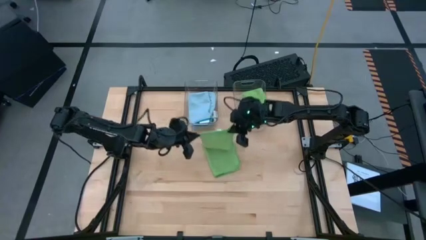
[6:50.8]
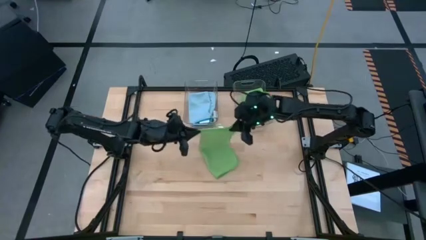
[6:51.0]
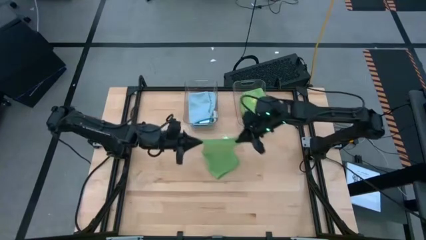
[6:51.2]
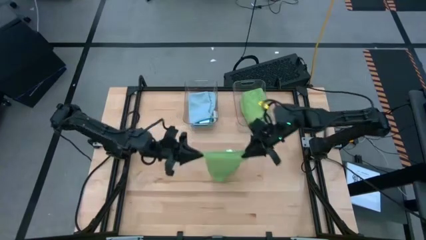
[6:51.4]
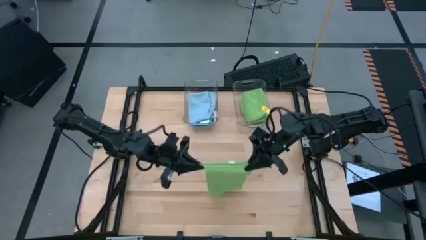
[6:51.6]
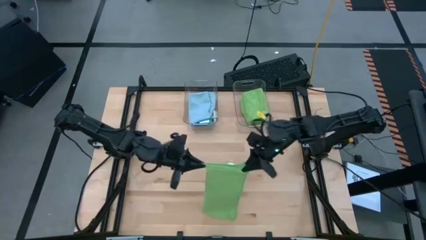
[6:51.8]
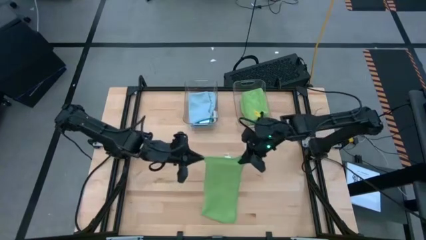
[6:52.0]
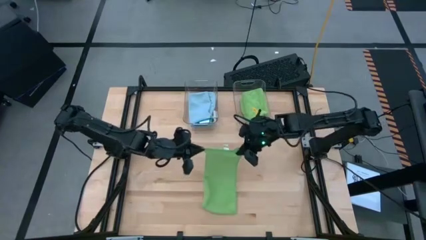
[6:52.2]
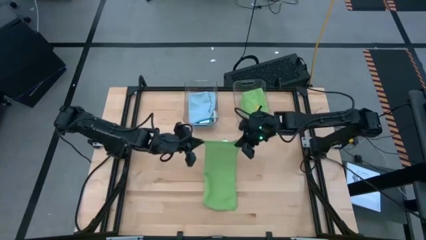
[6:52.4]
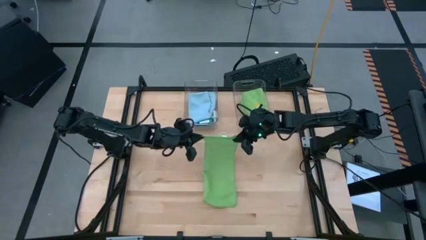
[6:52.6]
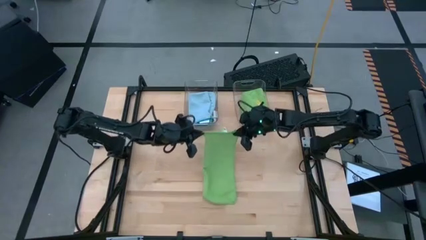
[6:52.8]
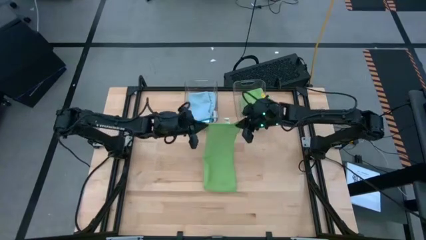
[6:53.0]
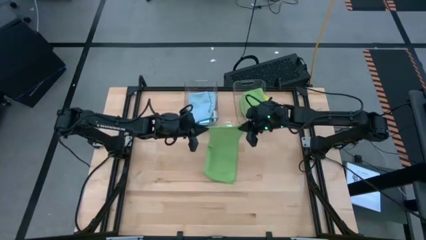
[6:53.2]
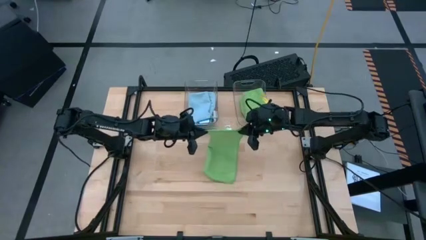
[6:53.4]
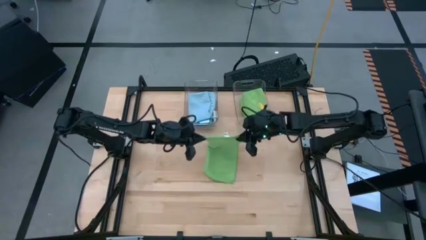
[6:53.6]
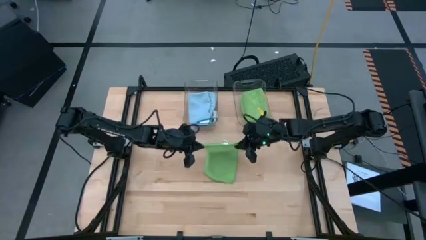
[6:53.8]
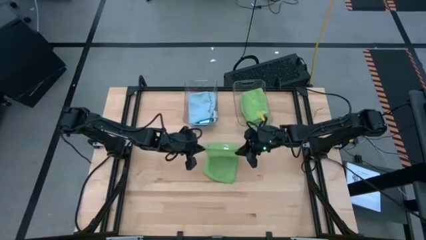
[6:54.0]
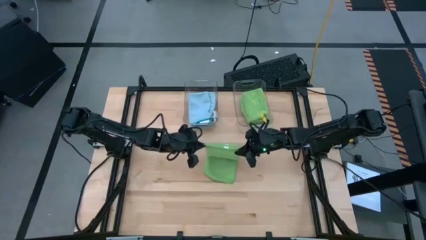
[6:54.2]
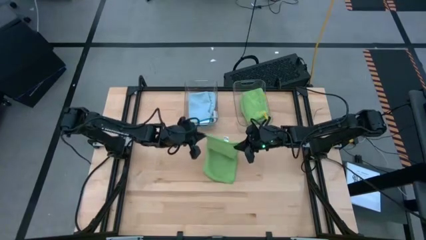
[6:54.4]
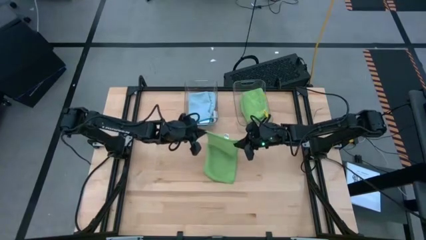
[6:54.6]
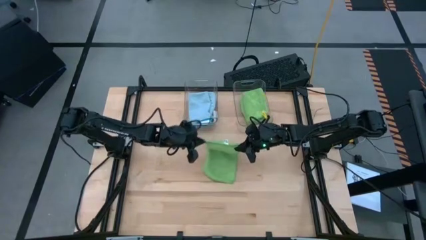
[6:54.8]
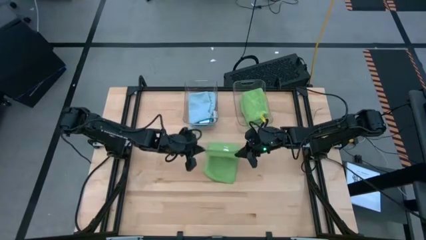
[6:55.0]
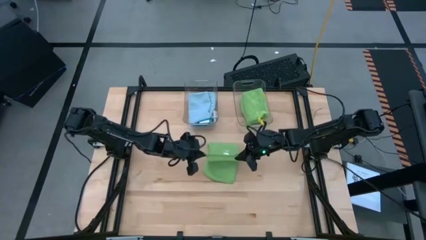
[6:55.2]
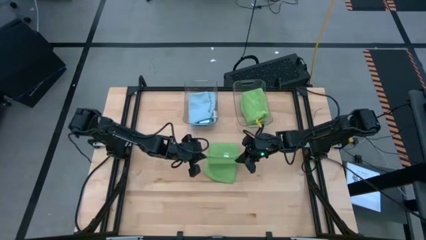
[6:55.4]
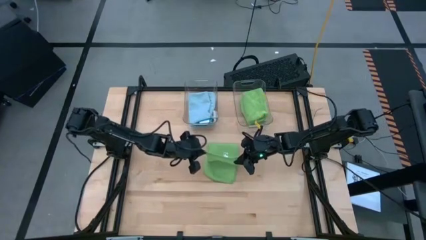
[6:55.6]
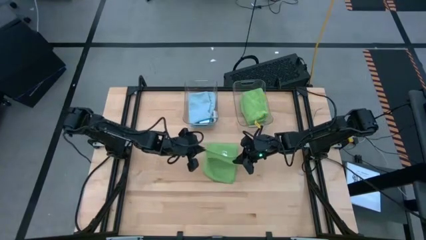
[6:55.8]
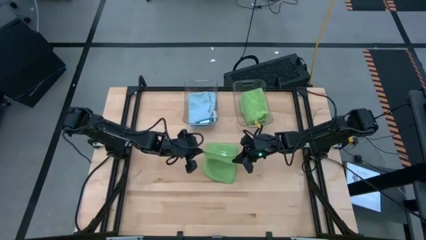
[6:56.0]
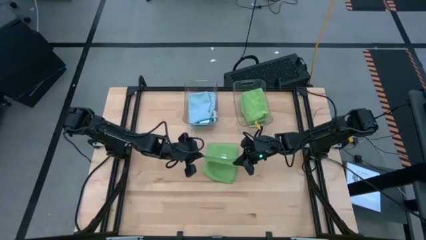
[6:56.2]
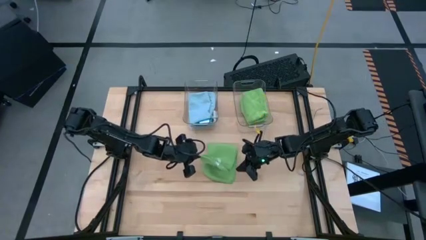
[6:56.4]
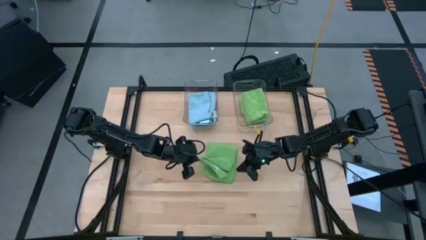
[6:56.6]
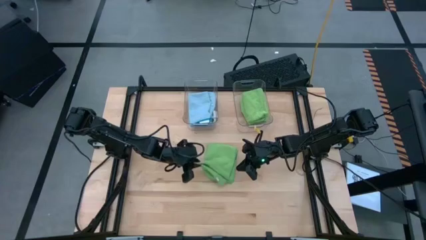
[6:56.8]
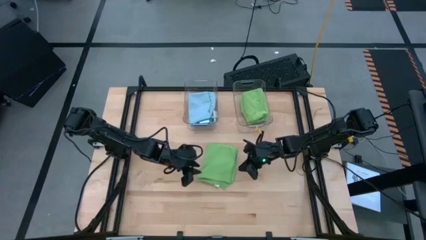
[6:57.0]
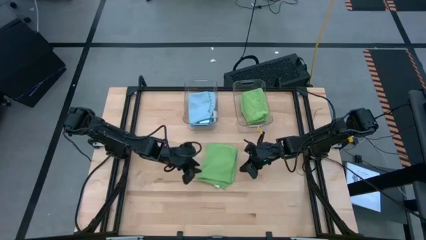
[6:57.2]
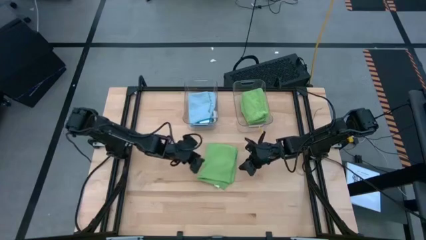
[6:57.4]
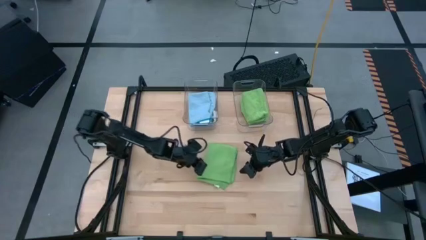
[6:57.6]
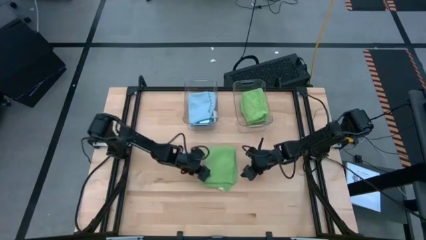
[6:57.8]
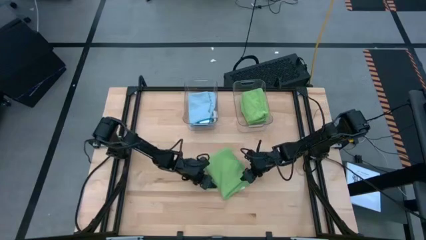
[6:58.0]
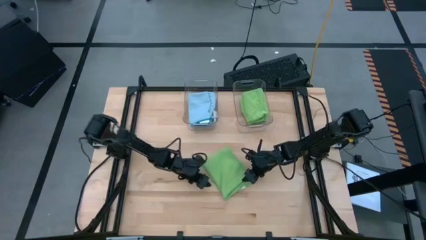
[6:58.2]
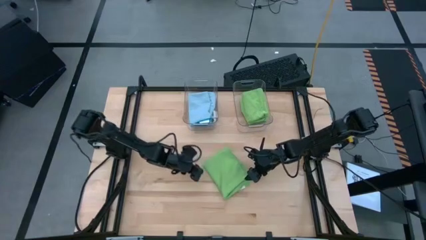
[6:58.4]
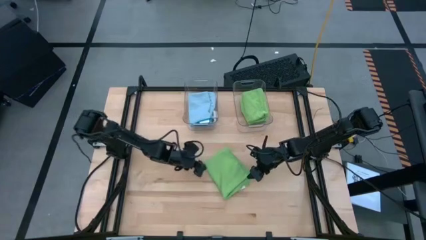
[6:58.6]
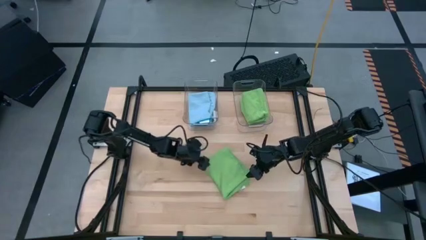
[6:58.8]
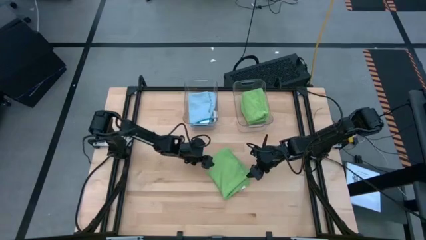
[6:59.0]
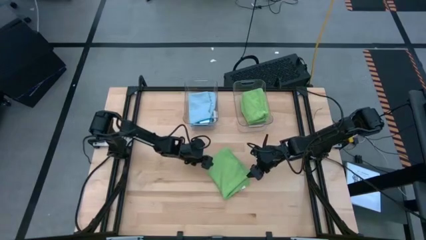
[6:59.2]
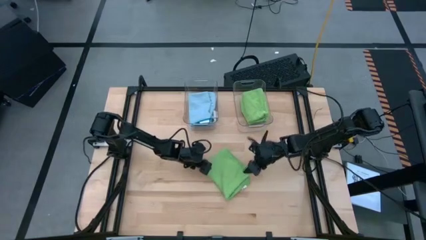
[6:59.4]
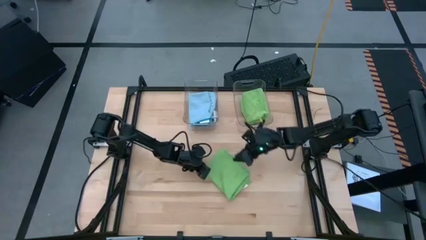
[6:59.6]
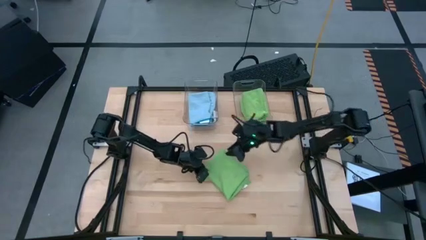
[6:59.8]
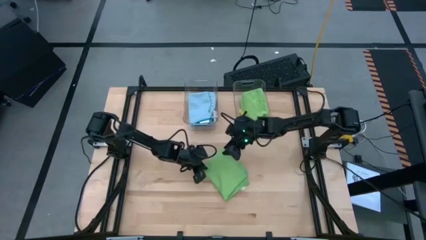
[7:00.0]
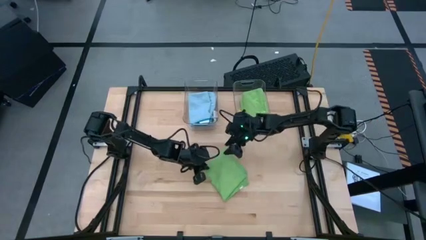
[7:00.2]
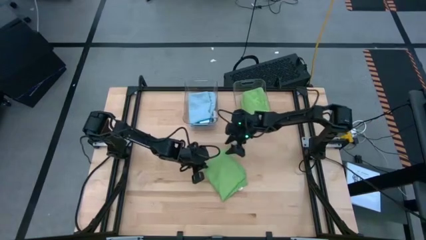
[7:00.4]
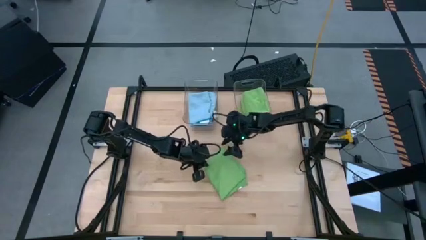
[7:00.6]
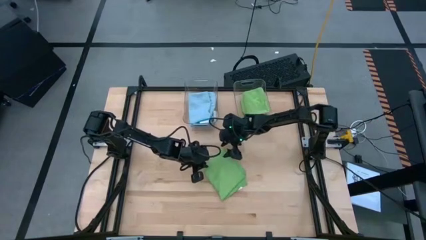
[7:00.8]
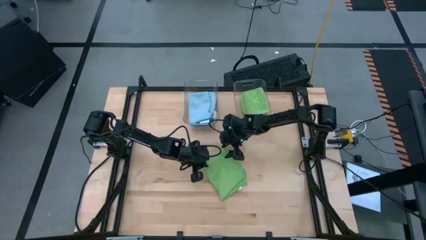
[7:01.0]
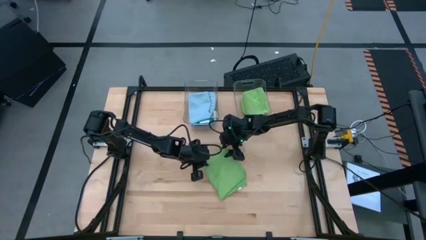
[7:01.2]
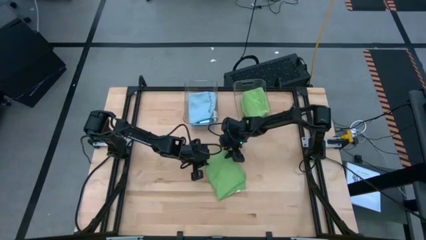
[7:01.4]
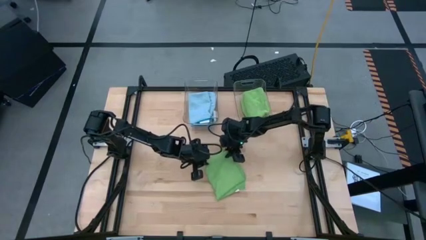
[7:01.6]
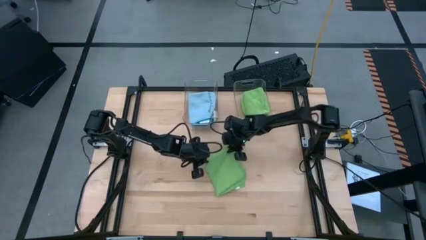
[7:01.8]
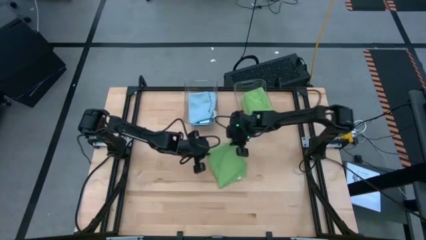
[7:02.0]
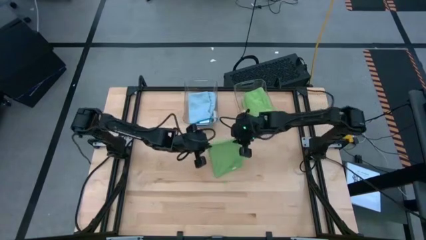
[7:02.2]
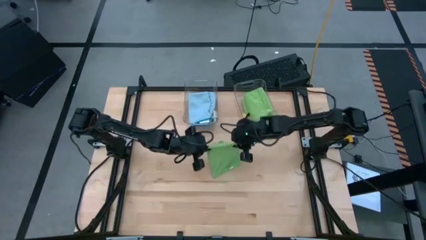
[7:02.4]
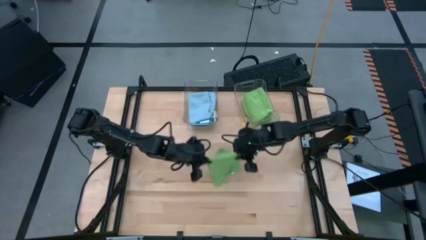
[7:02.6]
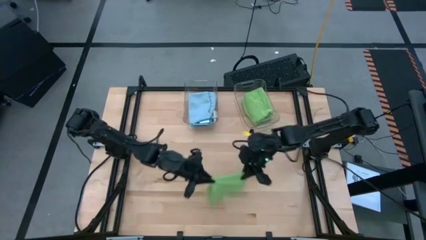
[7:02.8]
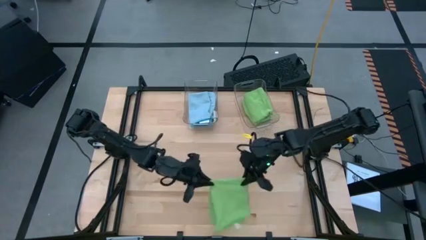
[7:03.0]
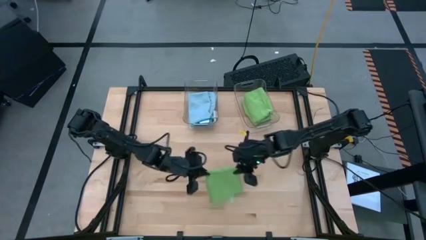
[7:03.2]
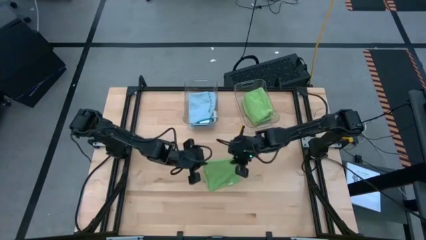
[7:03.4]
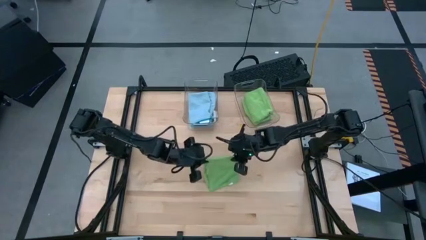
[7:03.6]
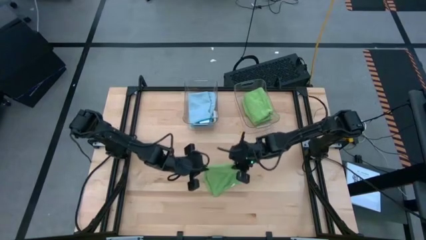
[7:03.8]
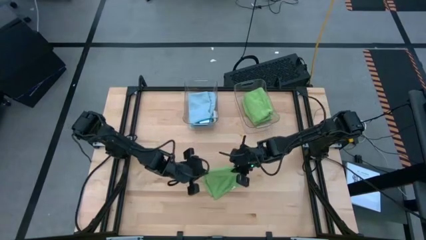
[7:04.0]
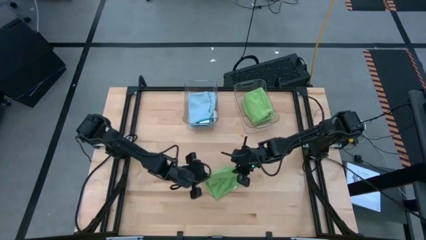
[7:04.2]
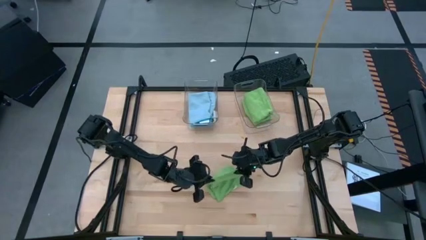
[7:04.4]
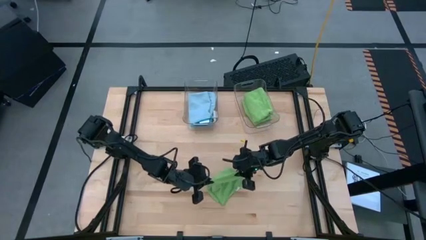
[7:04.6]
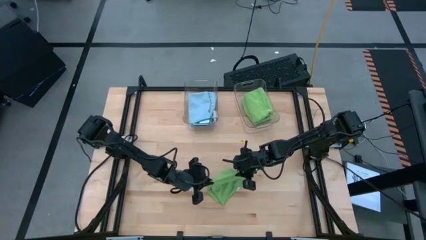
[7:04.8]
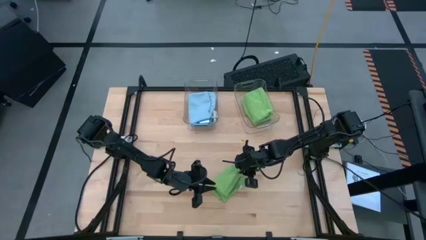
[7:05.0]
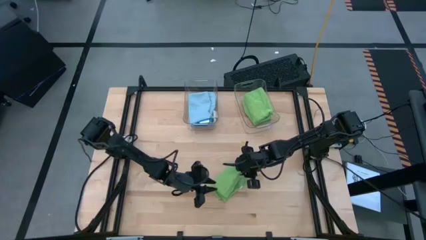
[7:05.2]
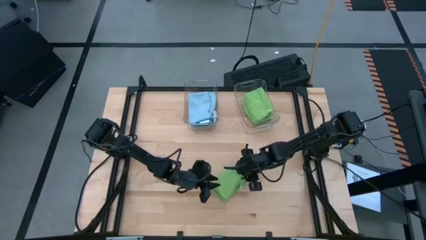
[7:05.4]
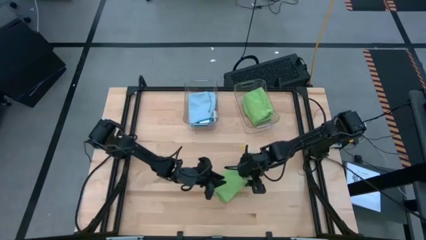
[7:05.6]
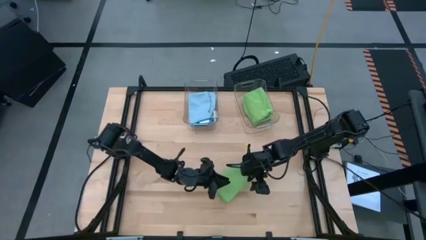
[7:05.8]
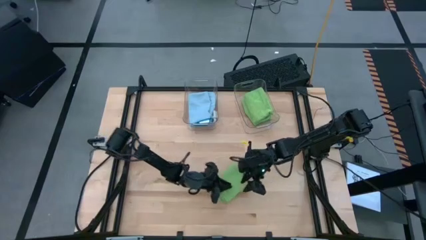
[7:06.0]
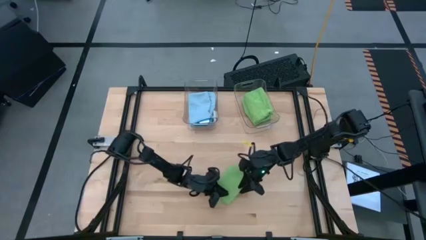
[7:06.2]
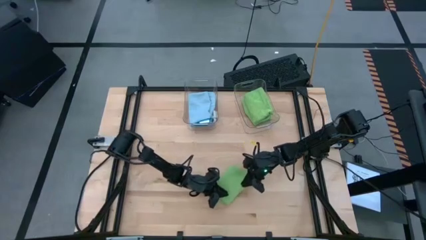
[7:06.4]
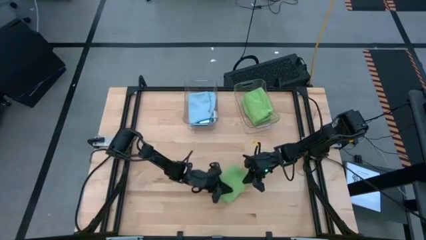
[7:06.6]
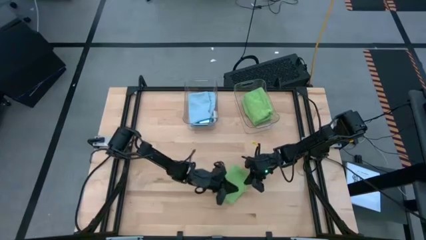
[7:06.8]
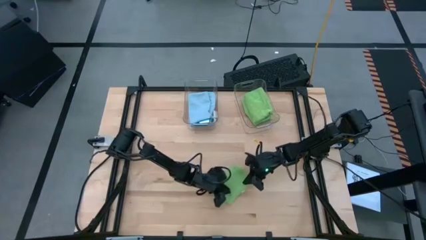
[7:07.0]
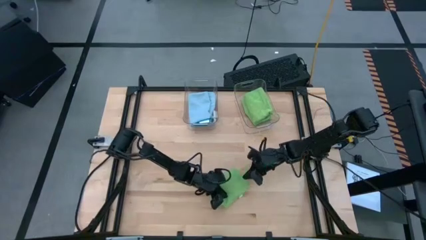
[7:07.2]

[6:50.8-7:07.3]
Task: Fold microfiber towels
Fold the green microfiber towel
